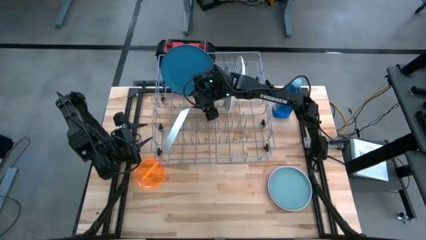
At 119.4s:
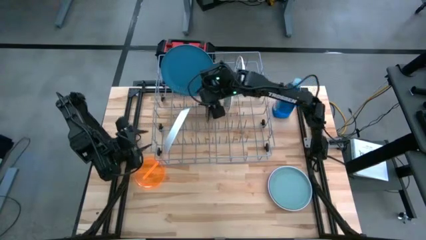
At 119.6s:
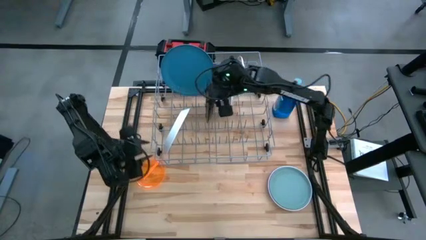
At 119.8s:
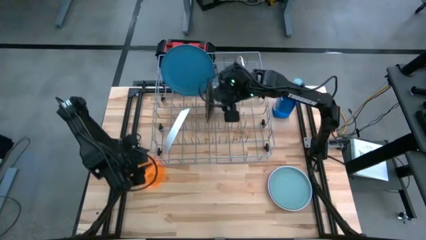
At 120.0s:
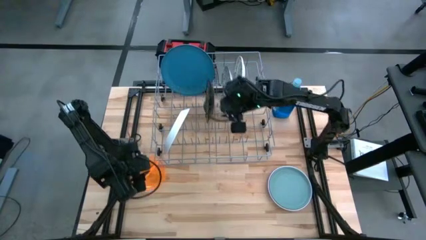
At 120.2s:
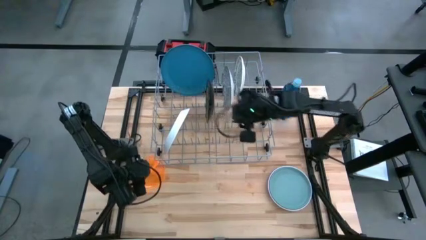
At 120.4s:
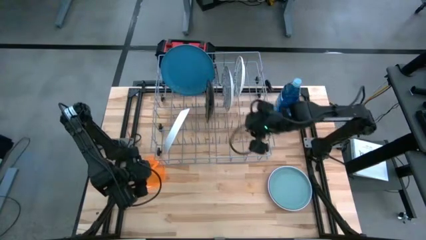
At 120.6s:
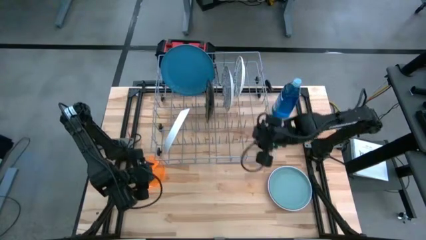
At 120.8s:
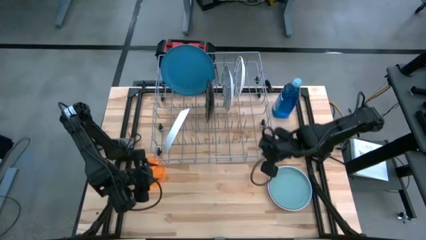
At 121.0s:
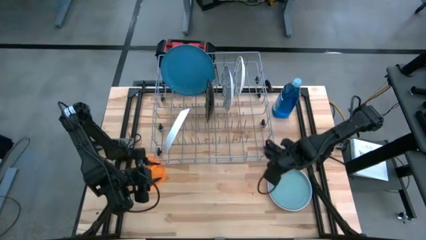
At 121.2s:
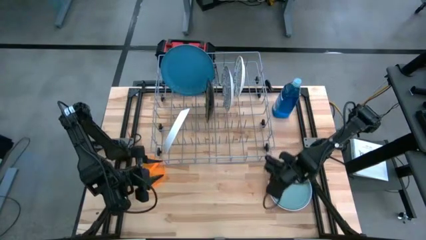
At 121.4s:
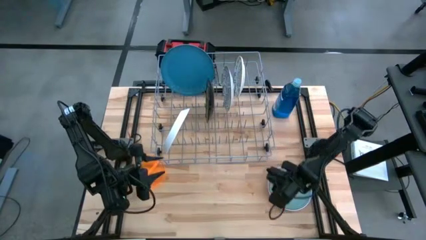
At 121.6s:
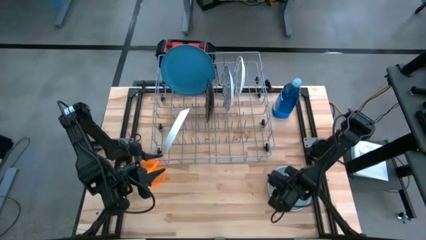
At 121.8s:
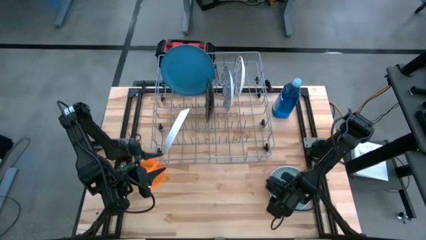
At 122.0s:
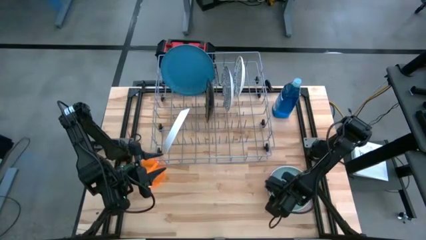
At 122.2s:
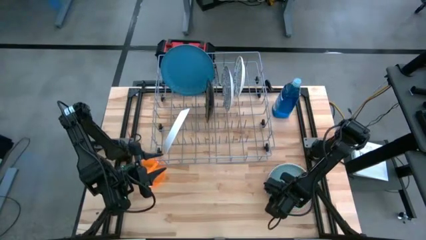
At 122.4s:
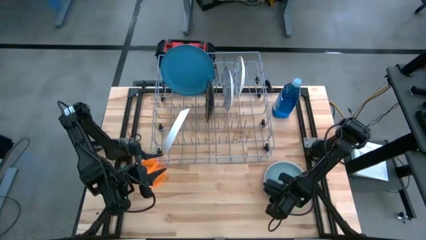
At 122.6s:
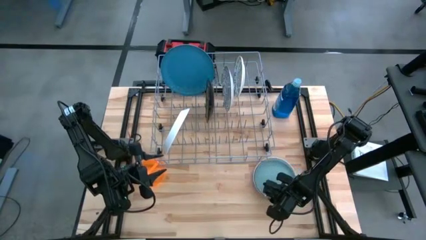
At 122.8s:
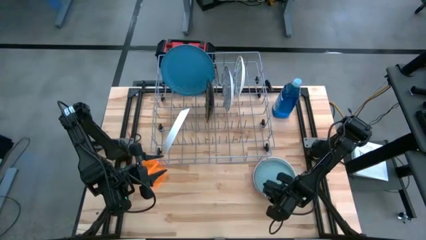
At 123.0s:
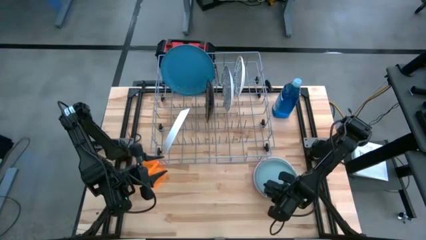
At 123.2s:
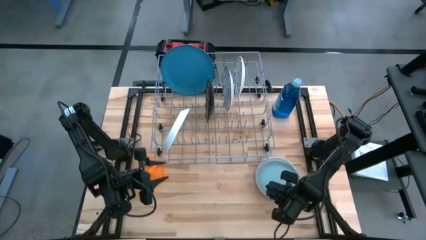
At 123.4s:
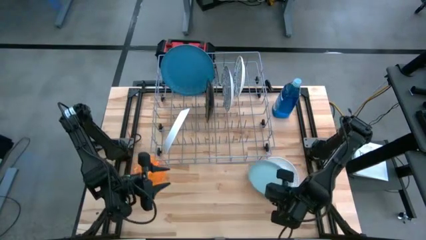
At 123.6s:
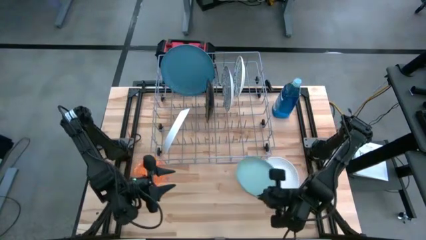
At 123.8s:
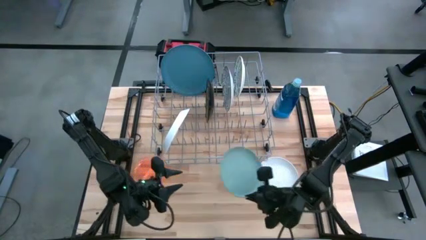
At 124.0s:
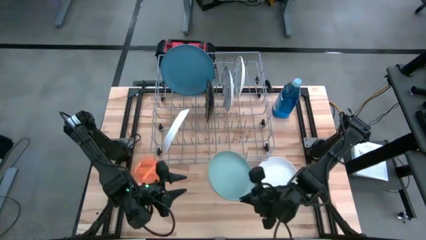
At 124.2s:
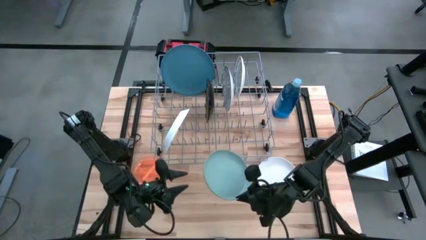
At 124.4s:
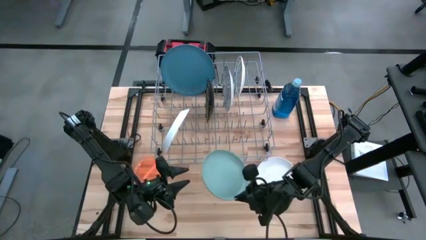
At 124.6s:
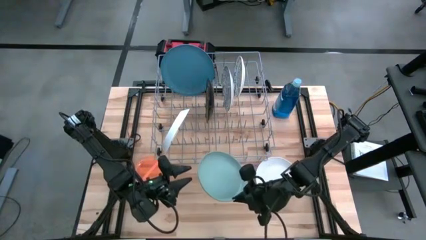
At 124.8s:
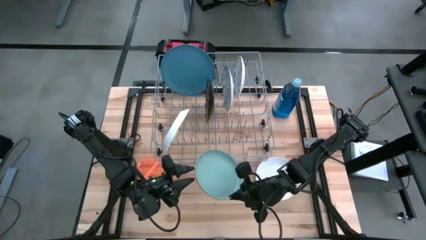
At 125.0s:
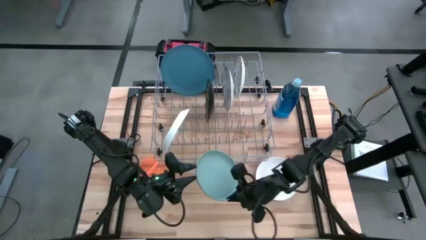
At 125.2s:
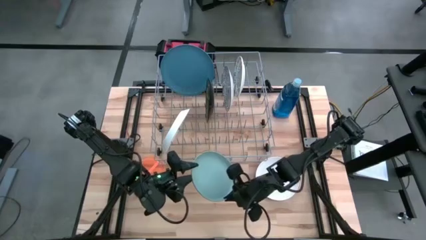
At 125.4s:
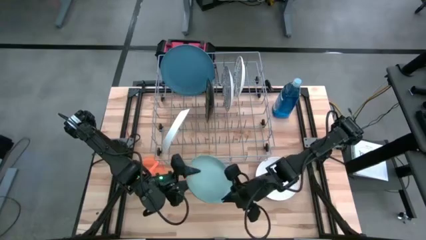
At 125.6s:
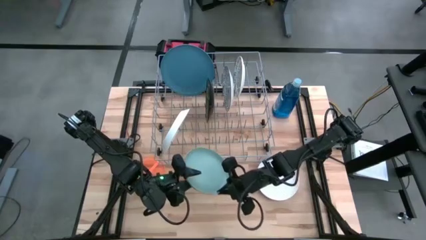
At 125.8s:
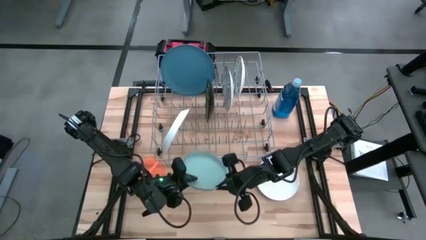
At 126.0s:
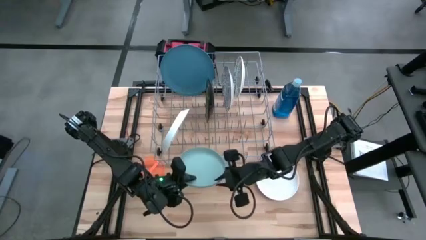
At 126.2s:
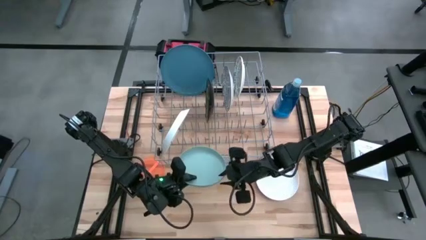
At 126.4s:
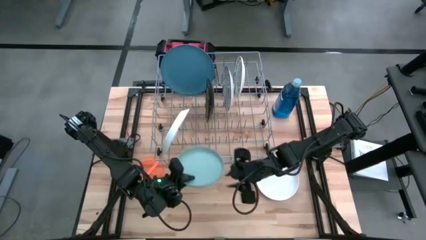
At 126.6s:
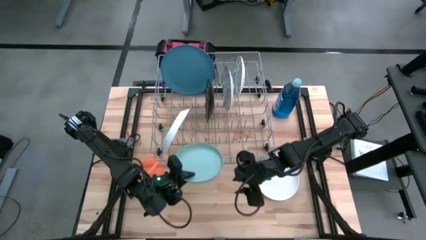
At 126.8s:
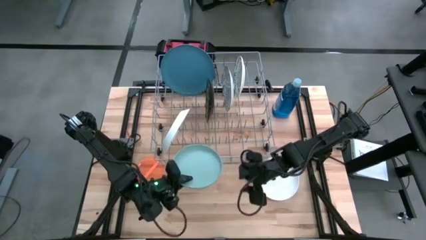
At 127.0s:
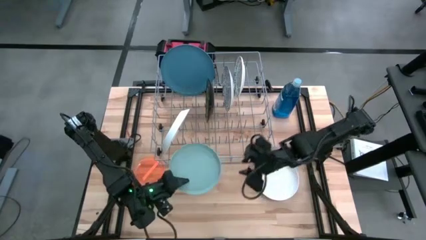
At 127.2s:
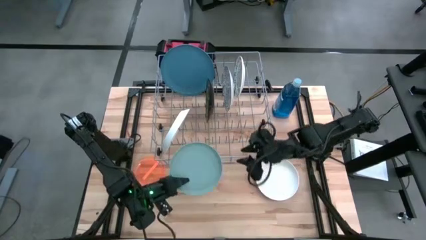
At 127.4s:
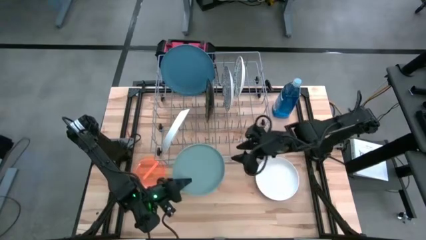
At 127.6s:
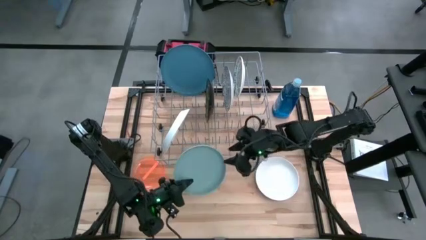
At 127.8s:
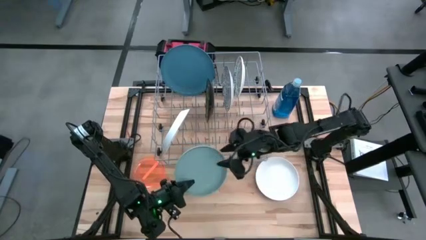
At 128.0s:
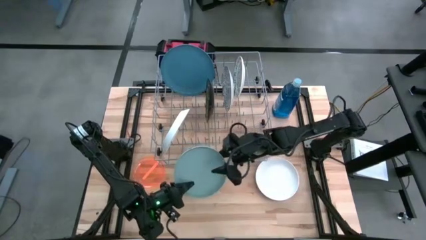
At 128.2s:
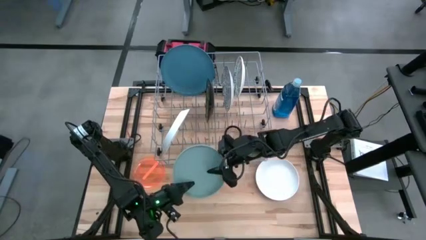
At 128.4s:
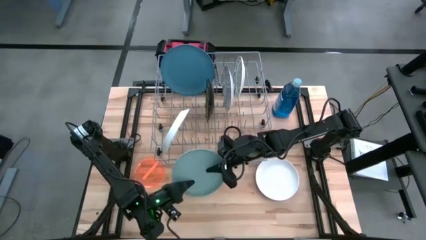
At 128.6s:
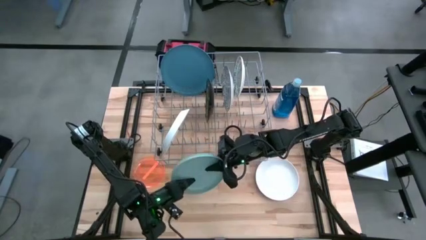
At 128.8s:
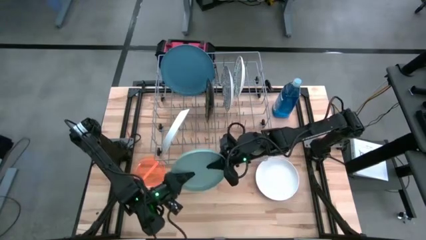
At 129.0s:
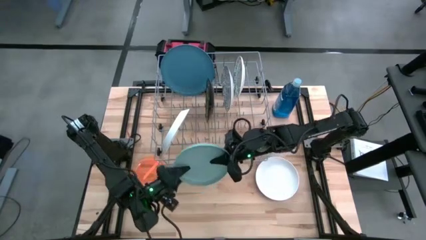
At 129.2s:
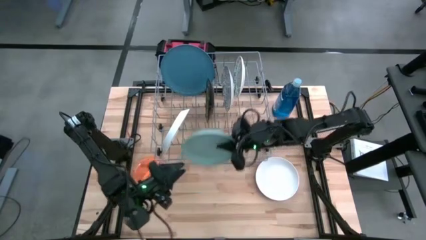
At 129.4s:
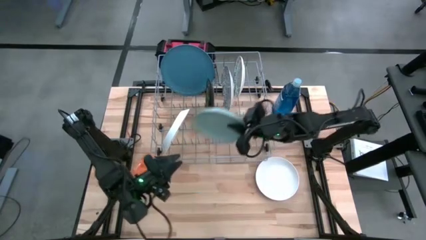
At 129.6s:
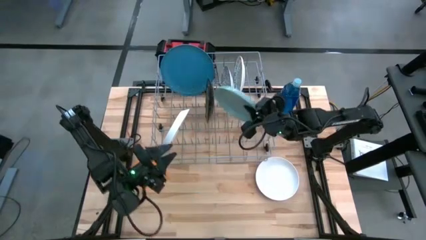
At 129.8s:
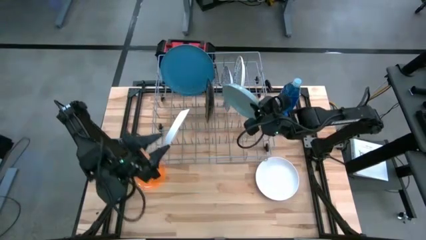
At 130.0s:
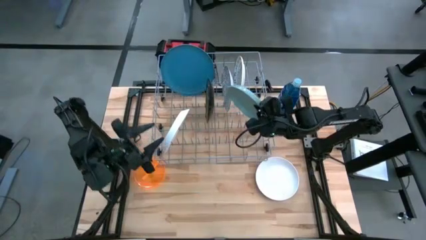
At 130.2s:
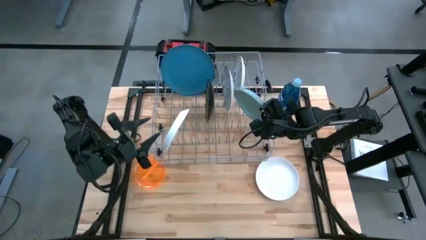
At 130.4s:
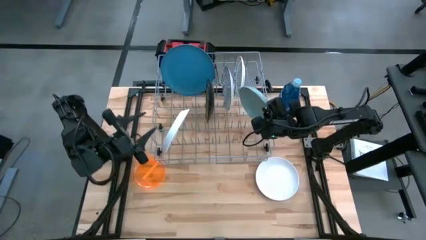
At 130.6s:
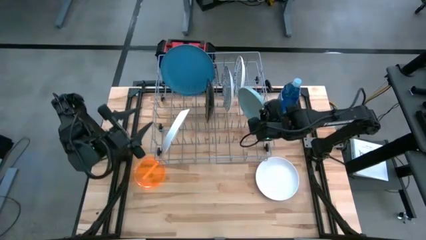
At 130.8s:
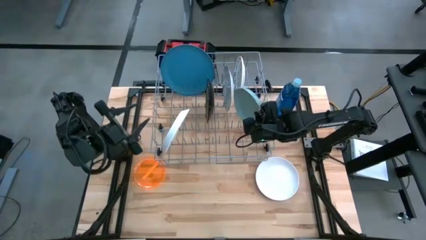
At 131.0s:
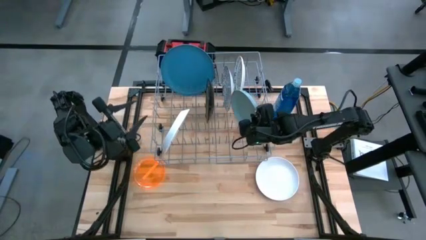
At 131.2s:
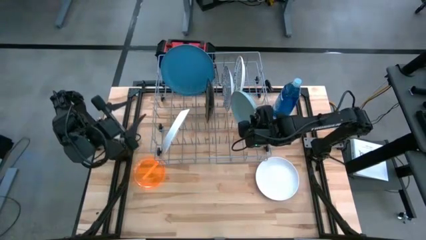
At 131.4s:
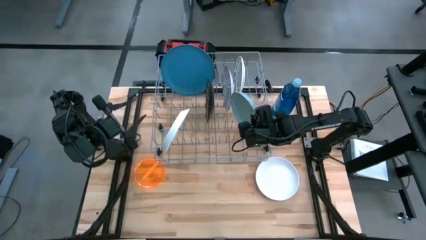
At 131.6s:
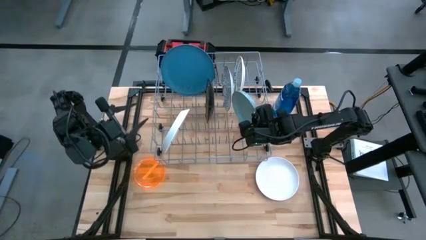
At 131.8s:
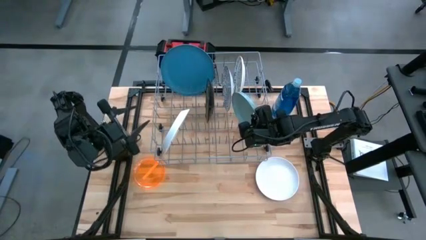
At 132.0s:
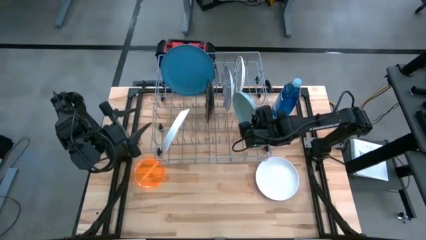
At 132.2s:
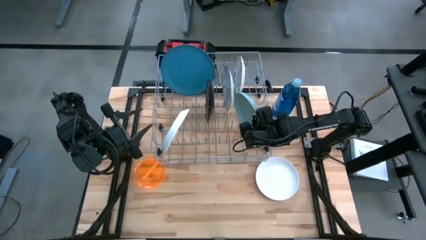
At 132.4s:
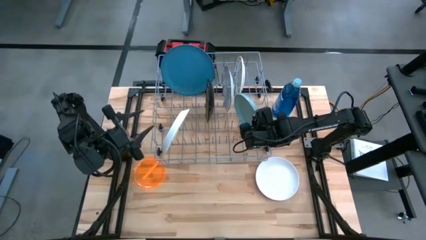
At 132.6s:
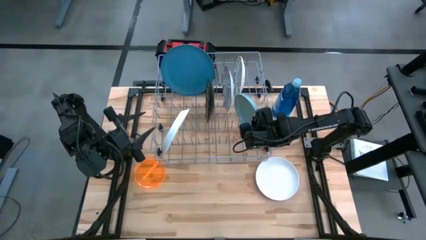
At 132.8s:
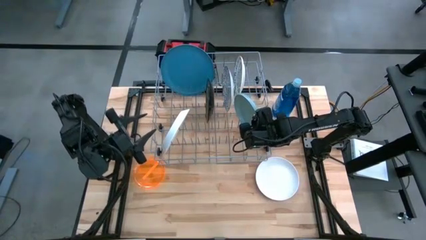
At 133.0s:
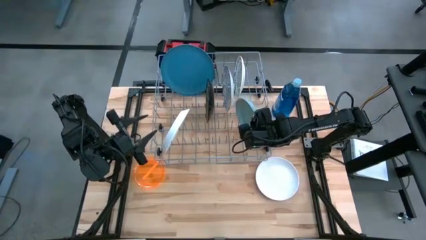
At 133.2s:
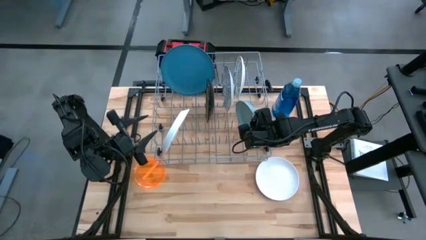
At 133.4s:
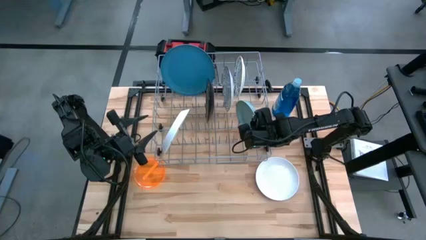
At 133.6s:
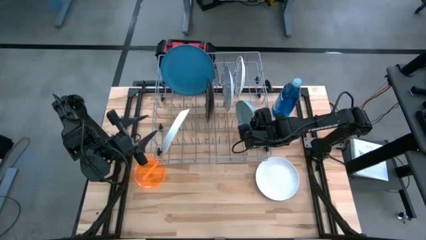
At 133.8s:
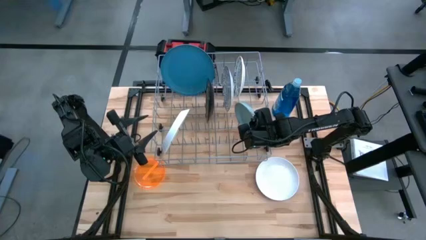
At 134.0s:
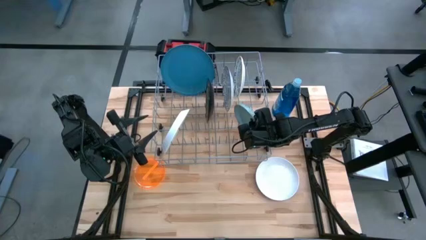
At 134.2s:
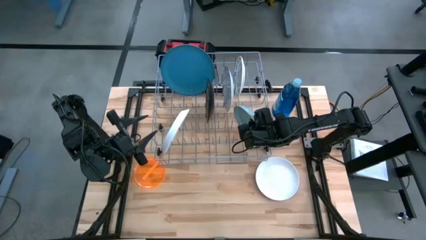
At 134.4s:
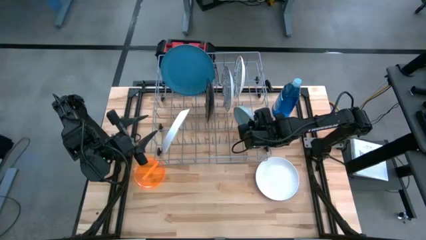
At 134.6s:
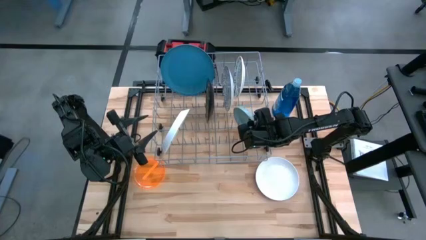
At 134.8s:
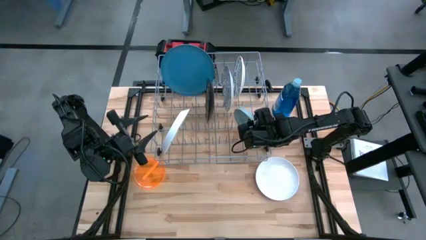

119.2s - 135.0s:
Task: Sort dishes
Put the light blue plate in the dish rack

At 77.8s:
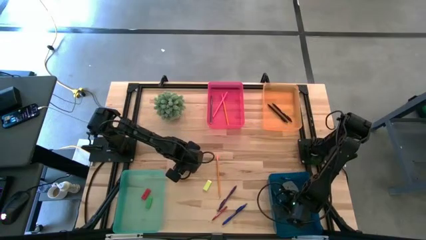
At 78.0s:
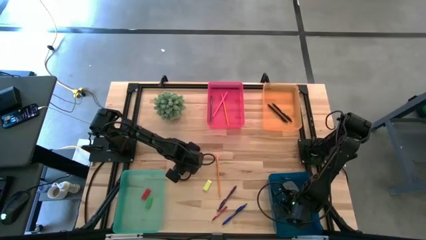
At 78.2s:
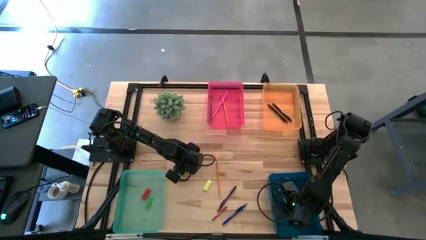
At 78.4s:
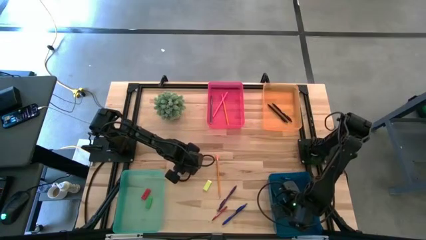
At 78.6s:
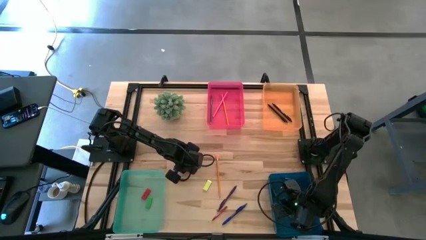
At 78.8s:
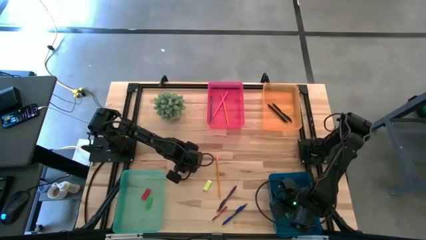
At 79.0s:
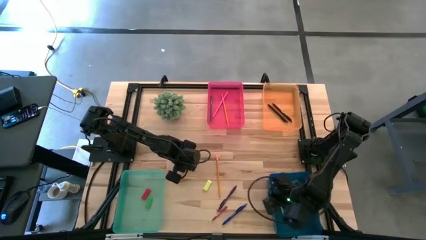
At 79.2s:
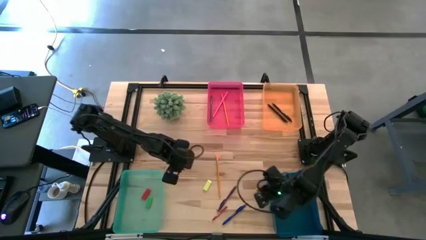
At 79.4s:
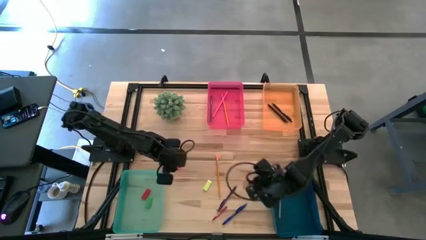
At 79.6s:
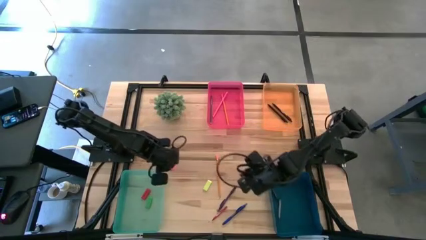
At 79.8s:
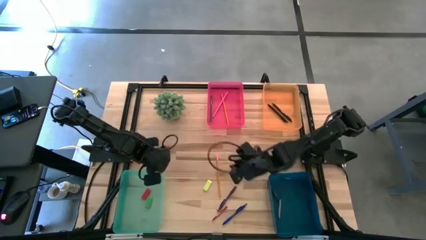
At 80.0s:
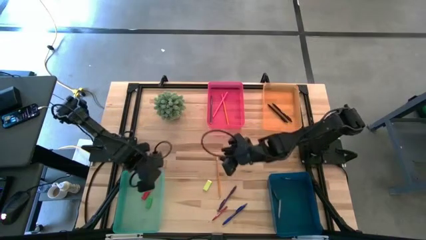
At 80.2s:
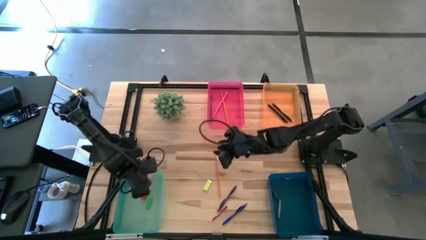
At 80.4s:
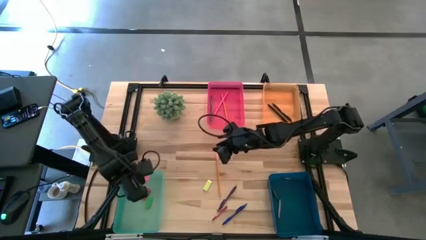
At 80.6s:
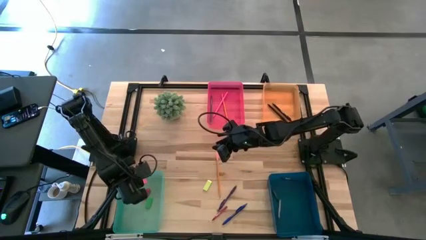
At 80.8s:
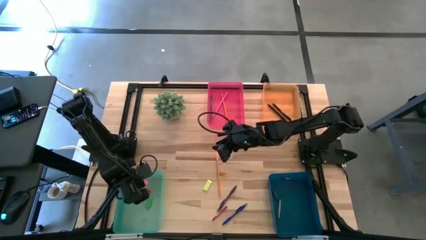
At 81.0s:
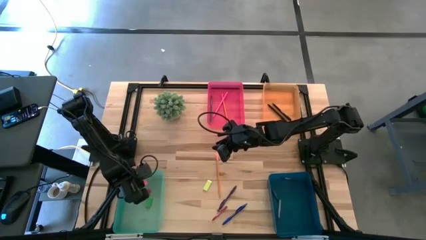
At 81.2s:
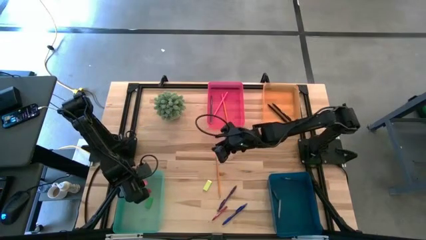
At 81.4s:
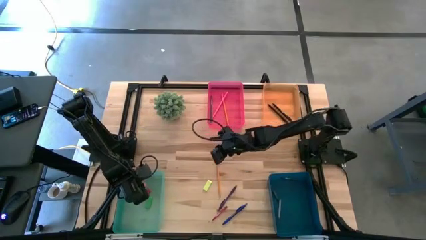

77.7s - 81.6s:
Task: Sort crayons/erasers/pens/pencils in bins
Put the pink eraser into the green bin
